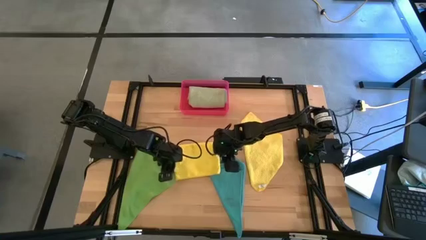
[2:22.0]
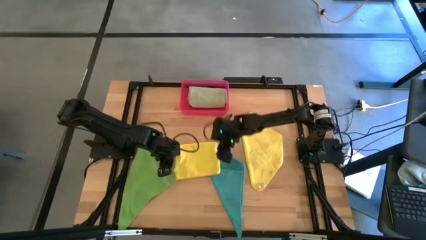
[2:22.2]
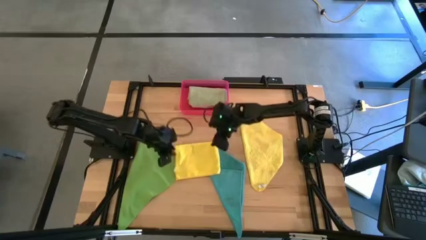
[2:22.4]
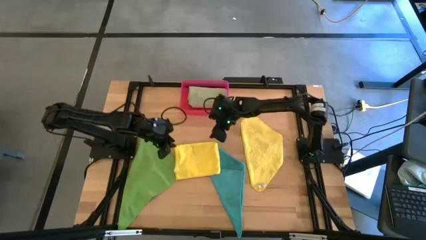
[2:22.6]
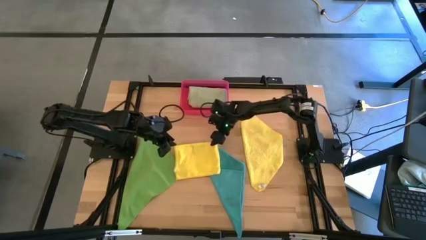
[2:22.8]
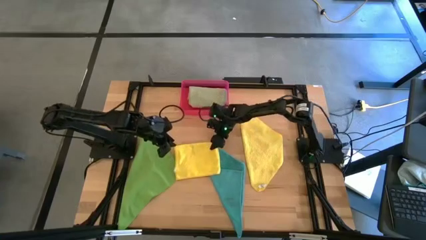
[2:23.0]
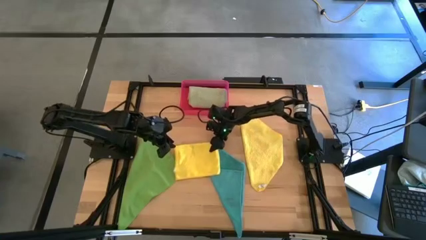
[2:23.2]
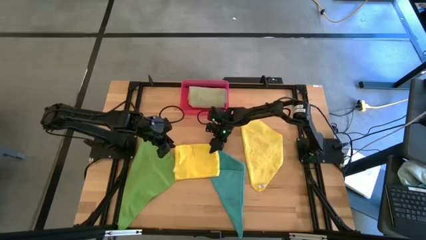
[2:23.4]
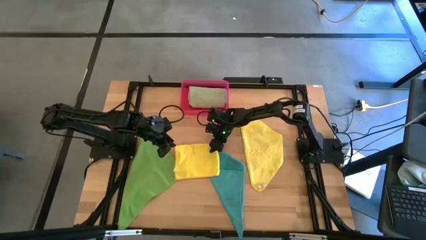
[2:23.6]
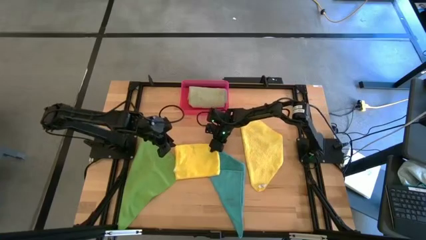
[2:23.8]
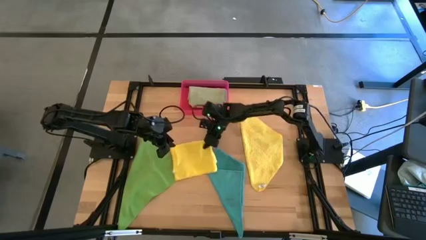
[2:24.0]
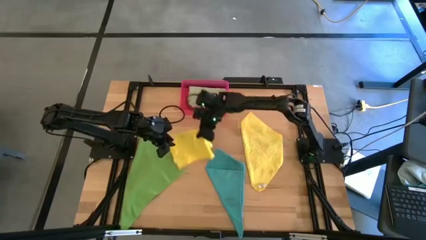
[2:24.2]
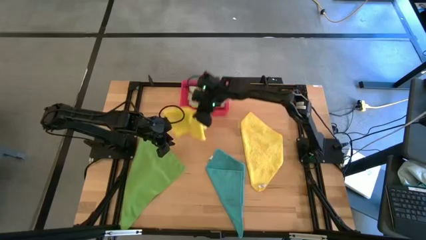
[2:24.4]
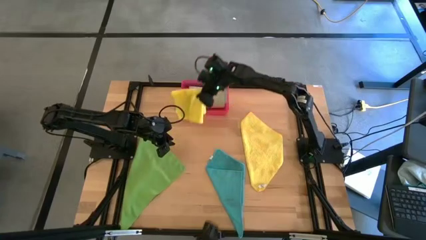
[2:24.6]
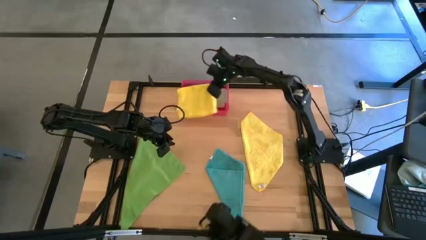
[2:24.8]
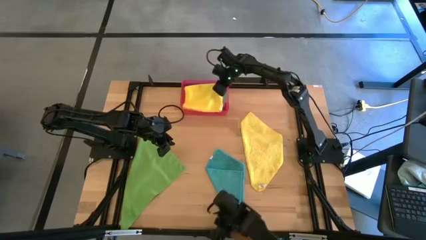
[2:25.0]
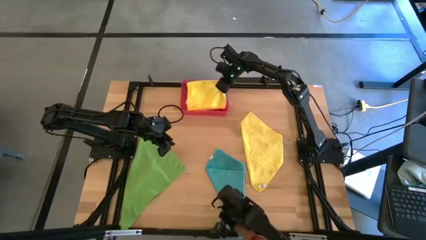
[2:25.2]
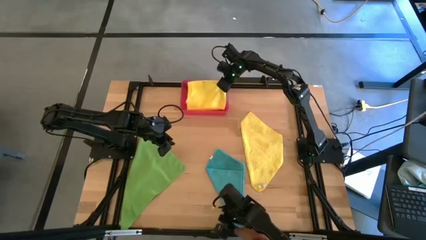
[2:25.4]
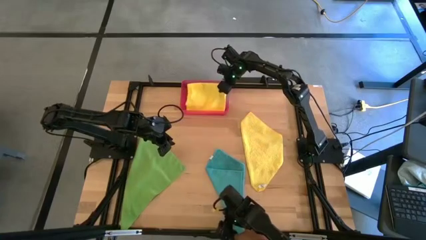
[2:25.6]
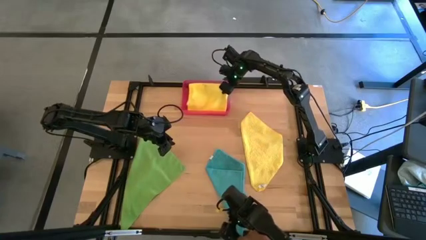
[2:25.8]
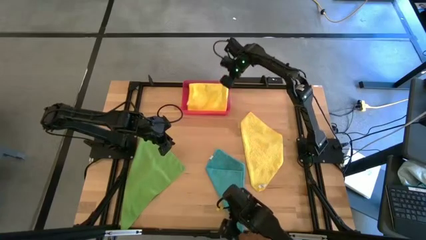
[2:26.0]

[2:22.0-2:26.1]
Task: Fold microfiber towels
Stack the left yellow folded microfiber cloth on top of the light green microfiber cloth into the bin

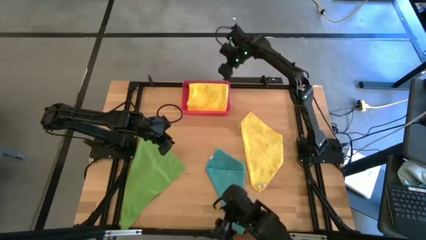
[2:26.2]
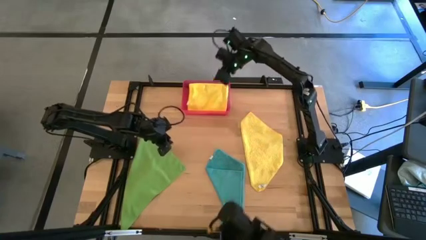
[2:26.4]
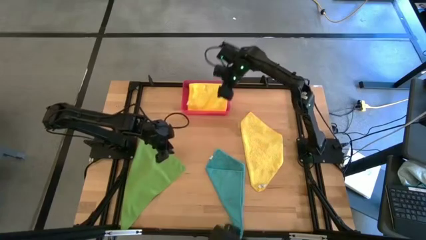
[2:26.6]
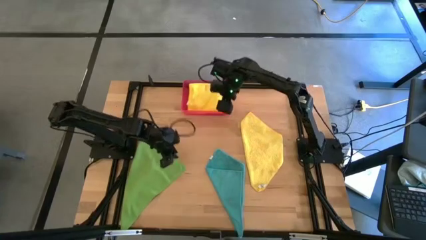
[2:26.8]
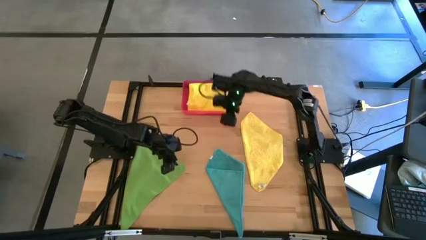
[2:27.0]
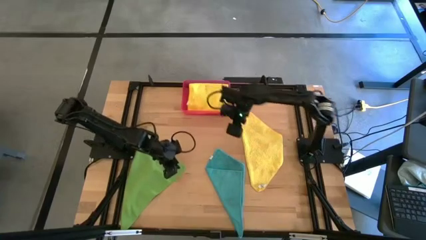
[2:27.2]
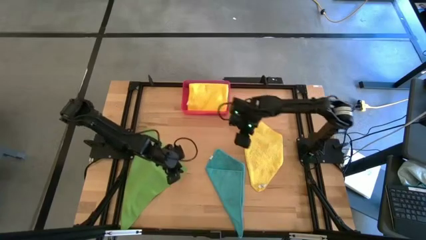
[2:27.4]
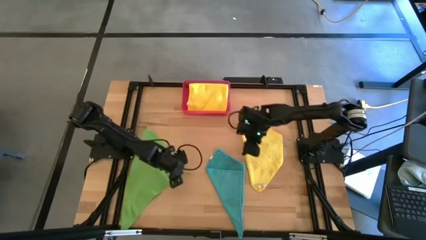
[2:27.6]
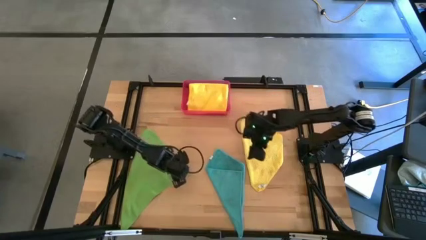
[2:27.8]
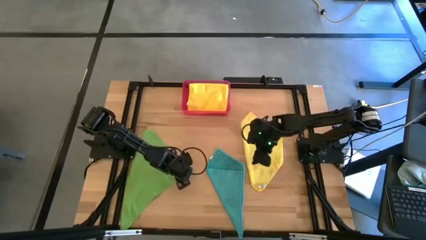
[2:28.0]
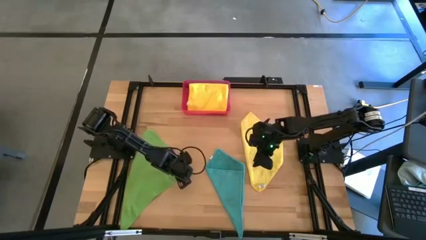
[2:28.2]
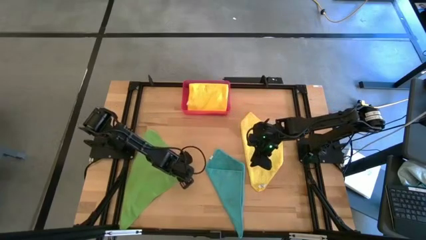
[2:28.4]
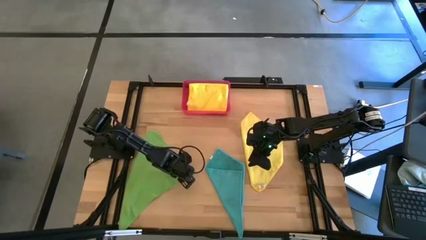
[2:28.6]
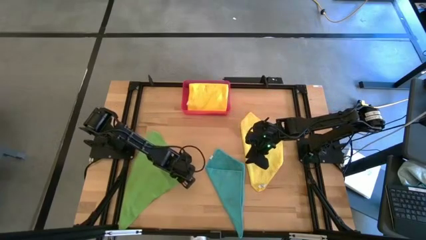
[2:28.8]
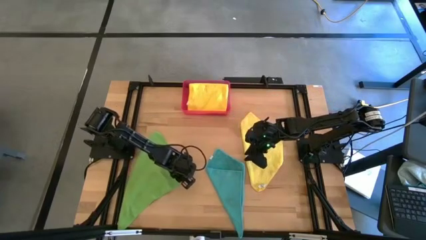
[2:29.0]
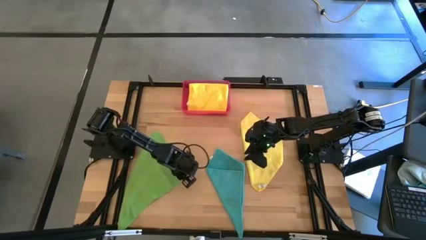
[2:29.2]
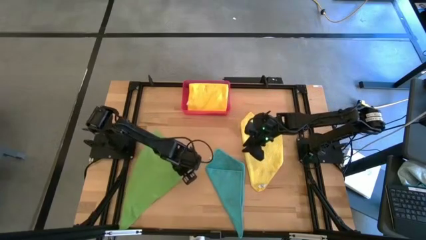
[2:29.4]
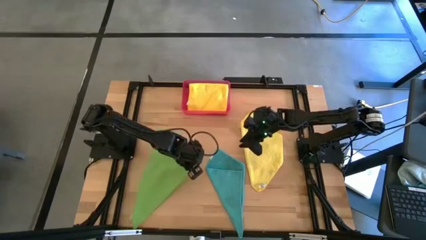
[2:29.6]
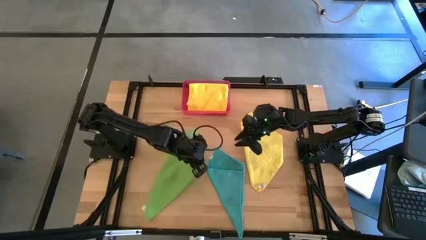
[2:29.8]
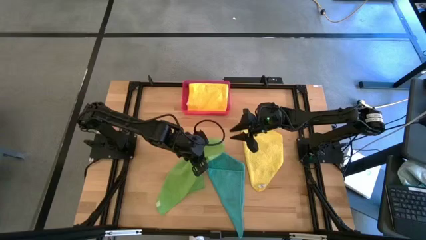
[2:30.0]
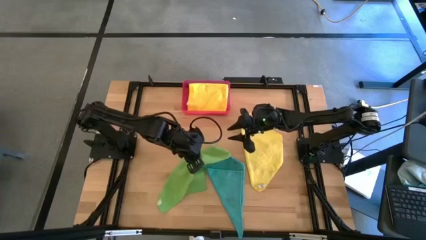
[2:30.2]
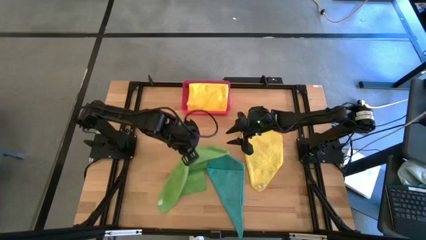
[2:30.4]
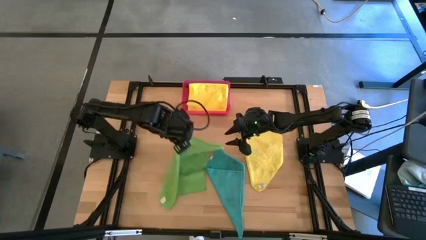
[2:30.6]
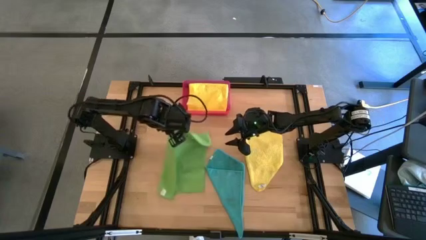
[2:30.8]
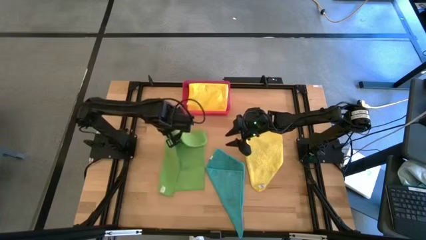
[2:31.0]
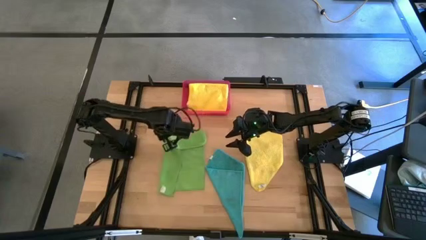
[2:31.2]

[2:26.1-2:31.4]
Adjust the green microfiber cloth

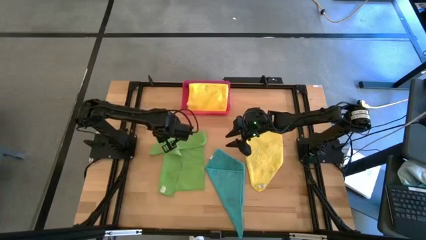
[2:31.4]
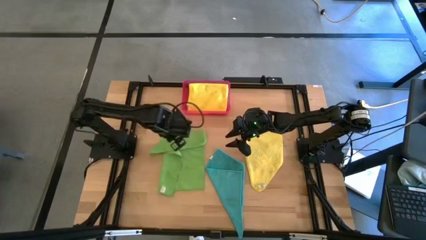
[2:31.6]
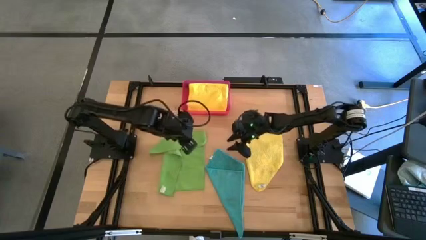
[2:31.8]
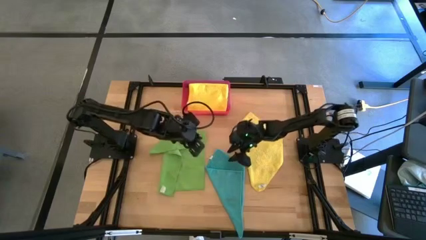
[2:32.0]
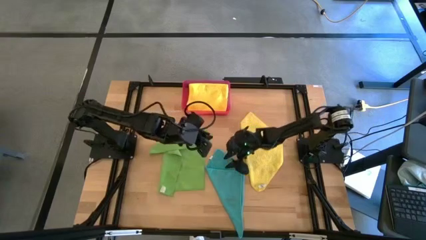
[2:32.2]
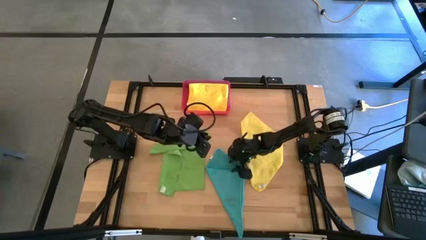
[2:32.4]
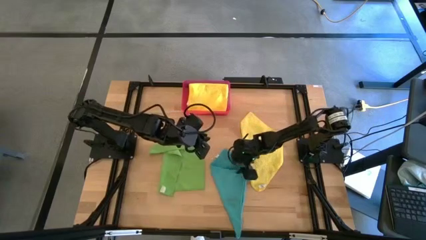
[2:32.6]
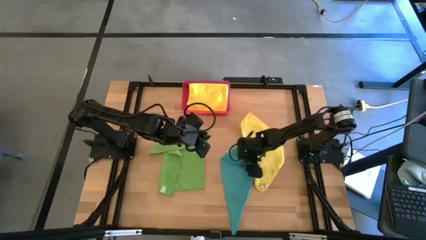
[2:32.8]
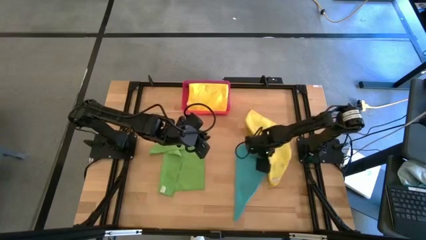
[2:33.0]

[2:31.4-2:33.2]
Adjust the blue and yellow microfiber cloths

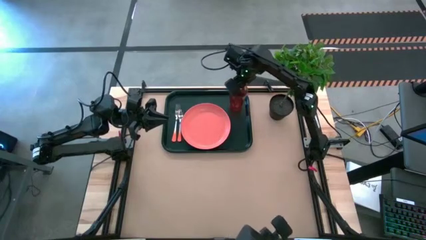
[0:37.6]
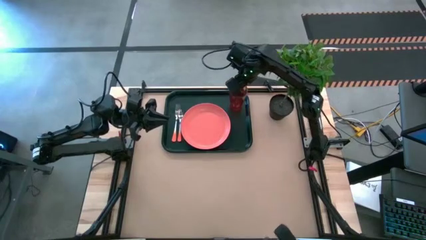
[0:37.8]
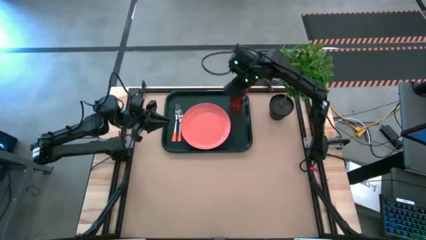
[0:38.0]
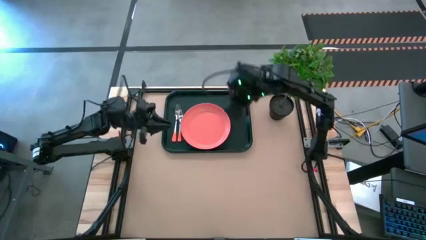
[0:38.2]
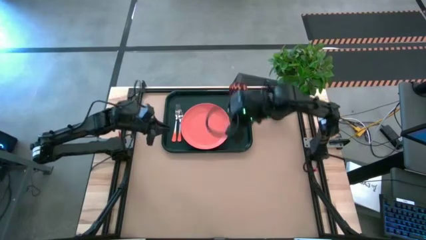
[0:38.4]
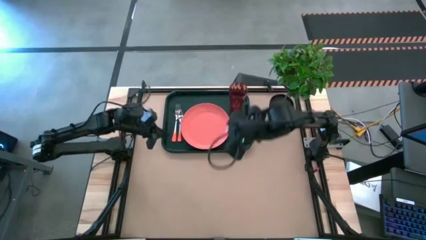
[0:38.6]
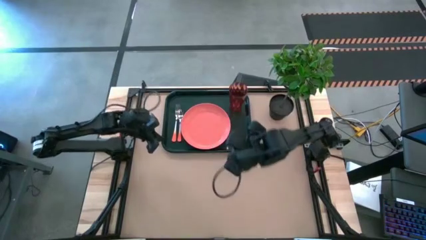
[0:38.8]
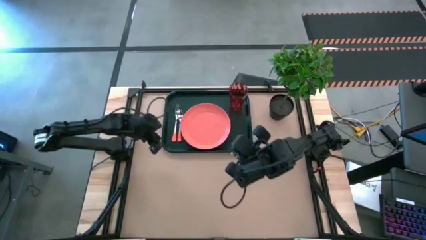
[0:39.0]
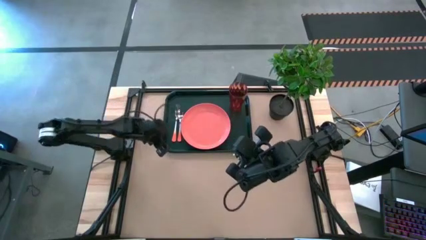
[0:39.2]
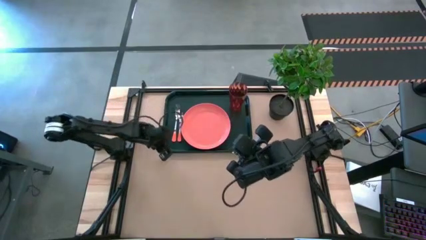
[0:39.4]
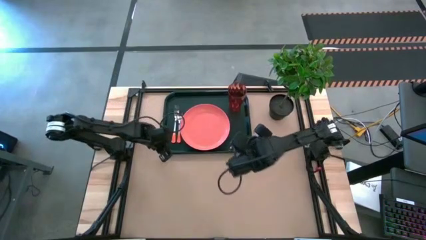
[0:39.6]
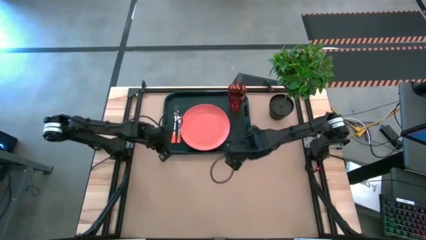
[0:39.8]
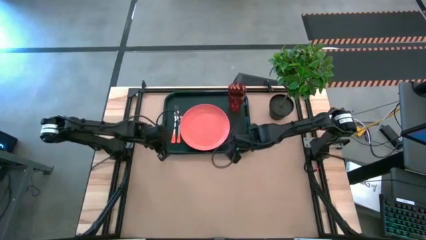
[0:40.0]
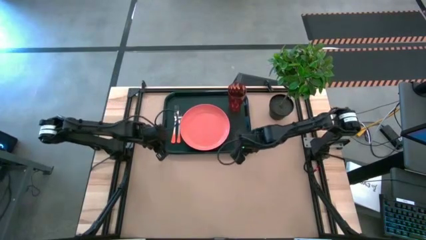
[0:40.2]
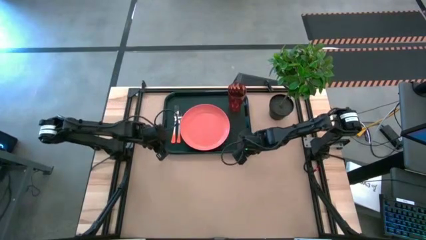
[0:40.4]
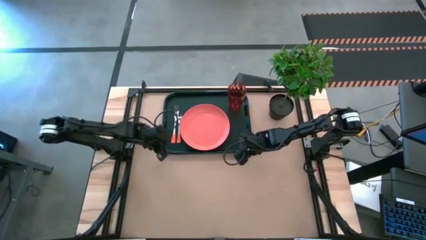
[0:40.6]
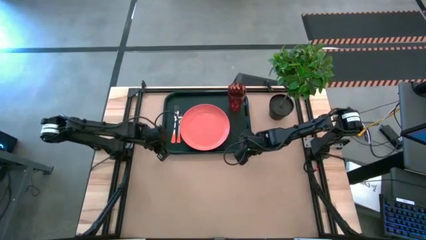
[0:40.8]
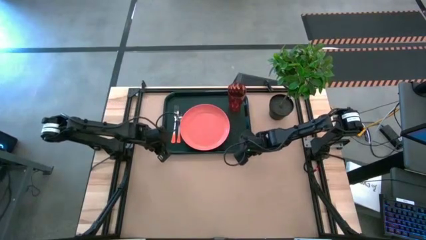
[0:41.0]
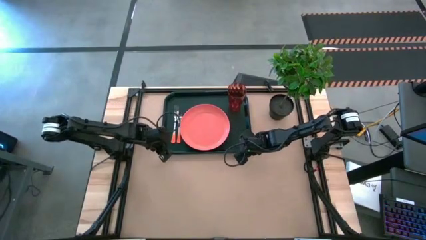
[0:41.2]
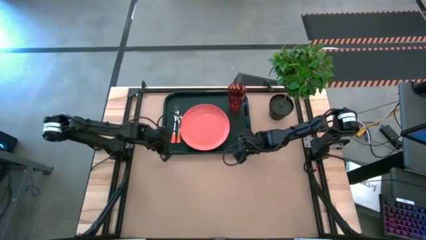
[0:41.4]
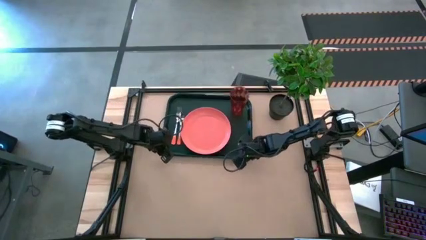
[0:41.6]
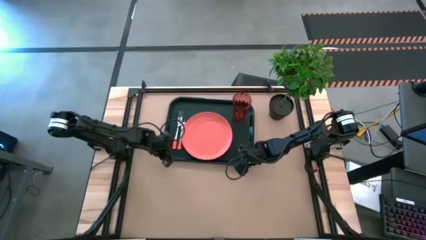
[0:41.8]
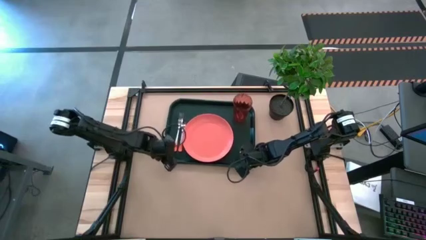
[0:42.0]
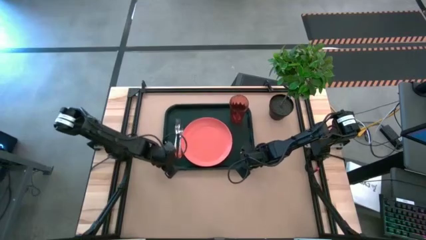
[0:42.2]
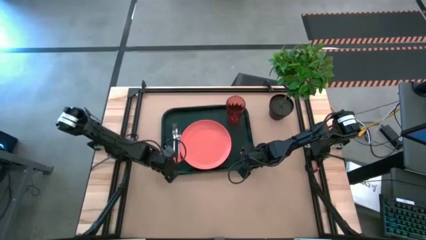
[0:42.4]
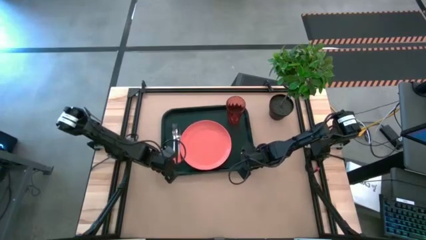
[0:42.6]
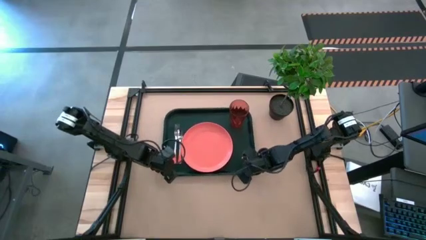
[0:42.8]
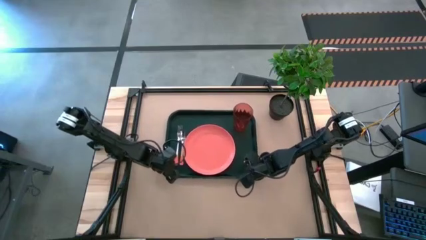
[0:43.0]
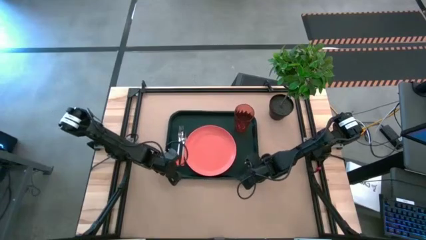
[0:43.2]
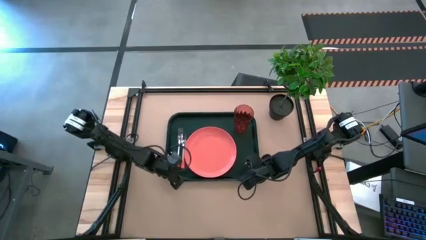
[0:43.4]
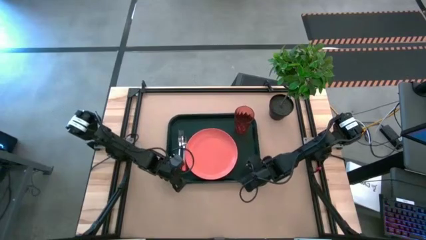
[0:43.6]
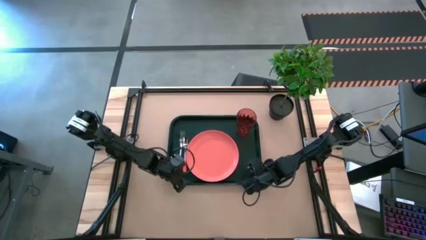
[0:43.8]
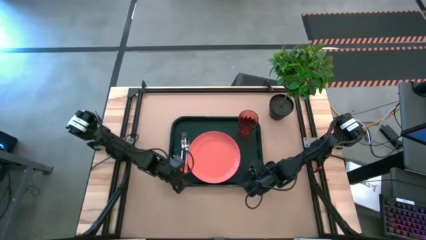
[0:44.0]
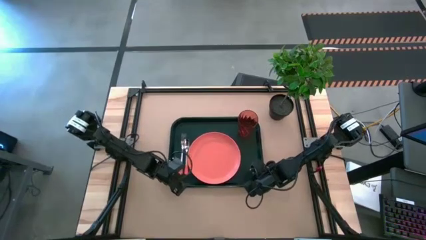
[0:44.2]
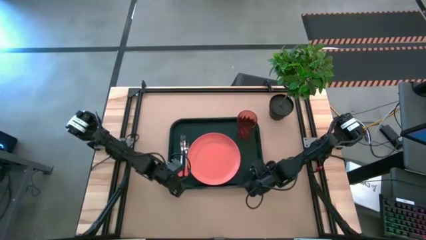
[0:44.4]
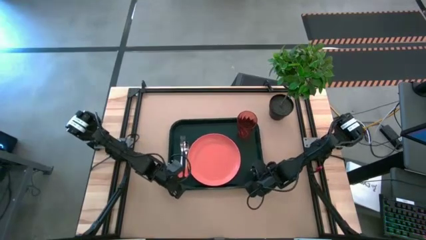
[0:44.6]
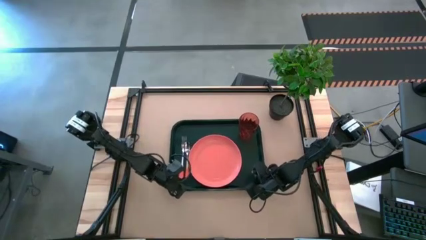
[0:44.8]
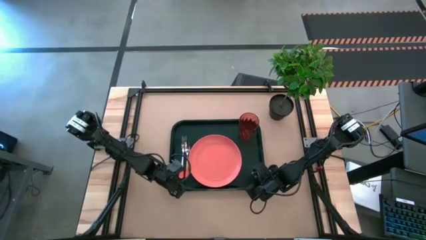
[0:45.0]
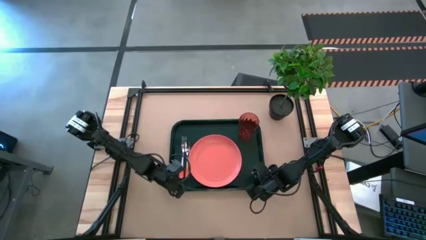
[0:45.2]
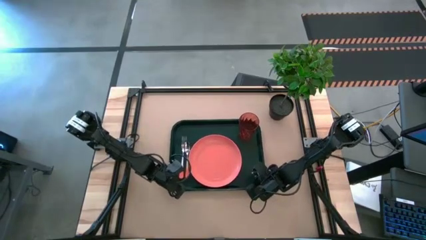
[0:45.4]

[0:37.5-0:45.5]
Task: Pick and place plate/cup/fork/spoon on tray
Move the black serving tray to the center of the table
